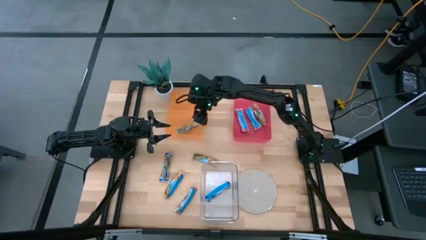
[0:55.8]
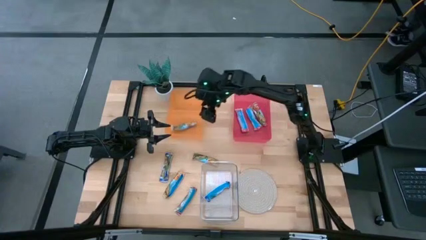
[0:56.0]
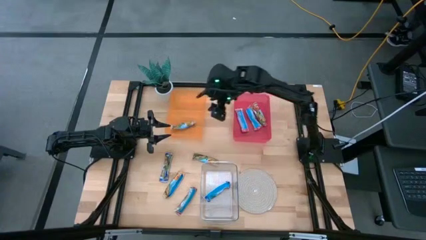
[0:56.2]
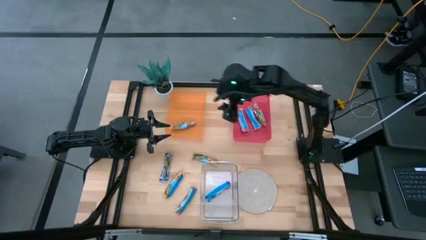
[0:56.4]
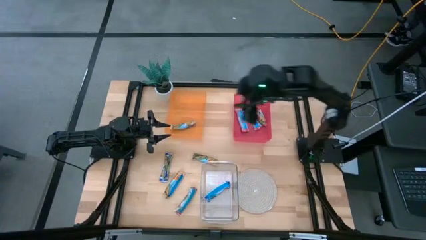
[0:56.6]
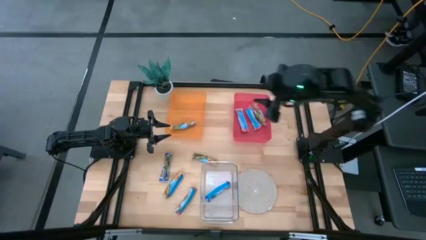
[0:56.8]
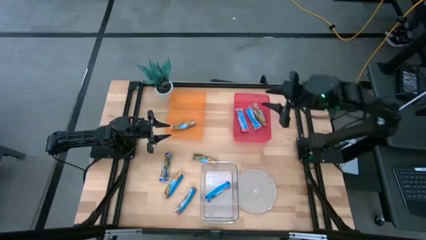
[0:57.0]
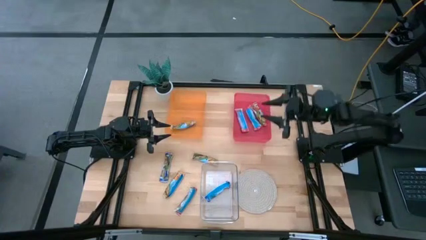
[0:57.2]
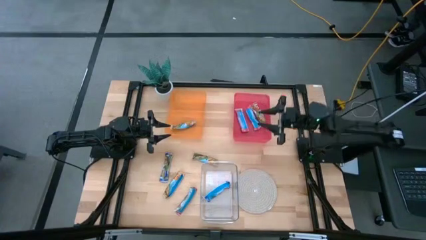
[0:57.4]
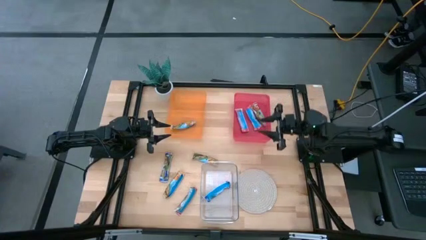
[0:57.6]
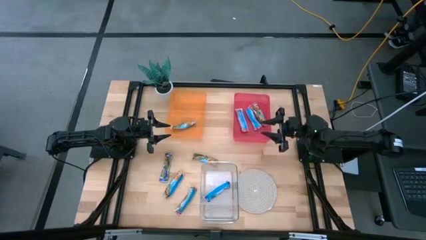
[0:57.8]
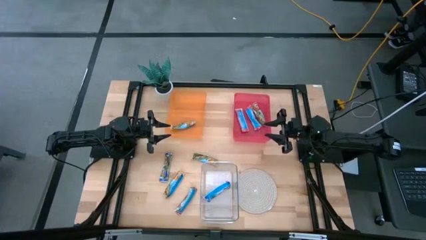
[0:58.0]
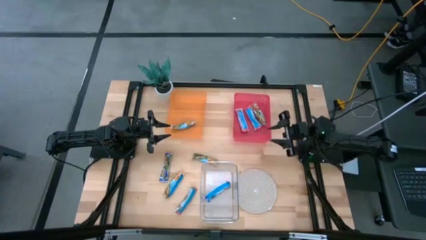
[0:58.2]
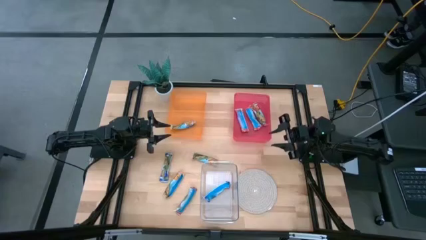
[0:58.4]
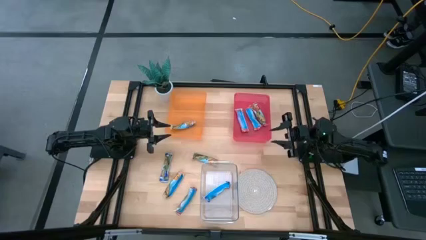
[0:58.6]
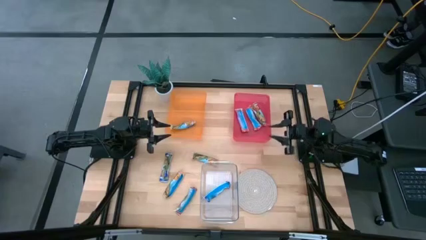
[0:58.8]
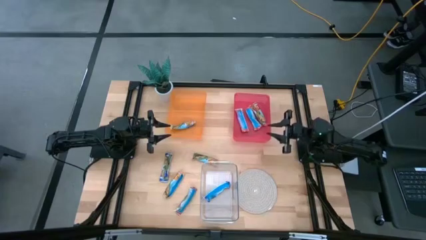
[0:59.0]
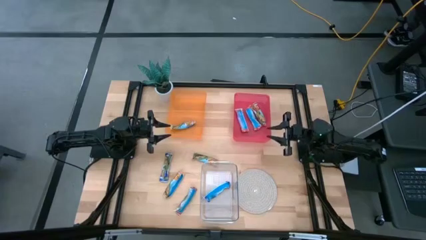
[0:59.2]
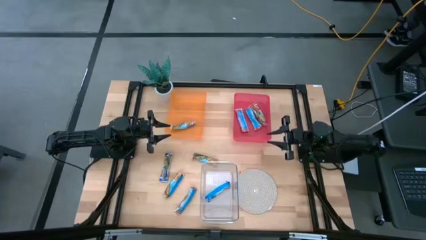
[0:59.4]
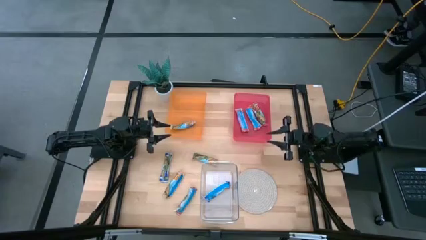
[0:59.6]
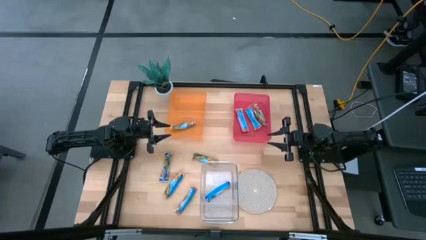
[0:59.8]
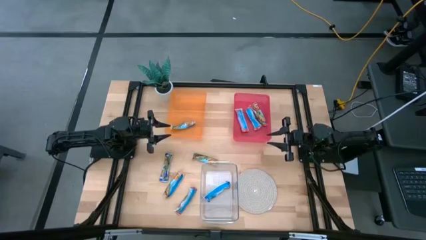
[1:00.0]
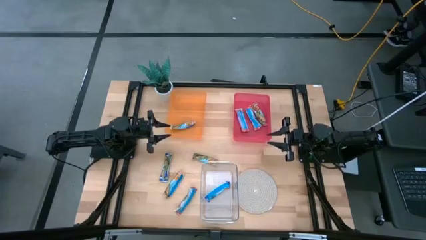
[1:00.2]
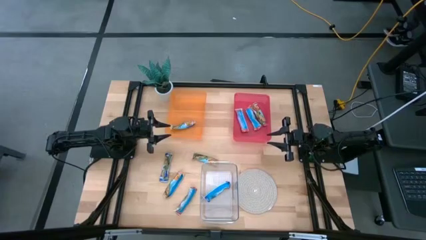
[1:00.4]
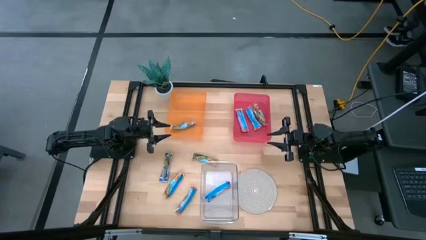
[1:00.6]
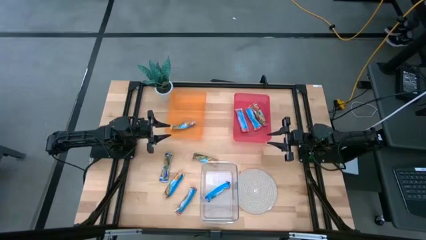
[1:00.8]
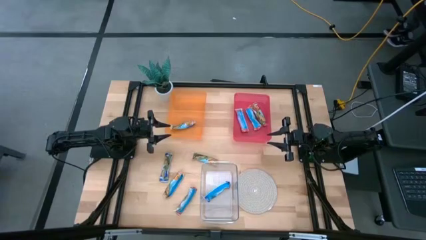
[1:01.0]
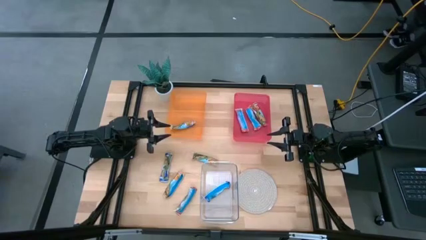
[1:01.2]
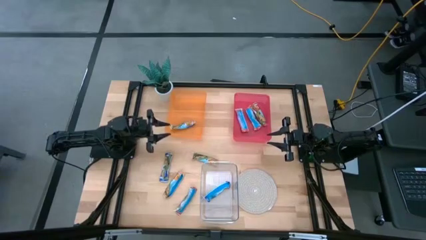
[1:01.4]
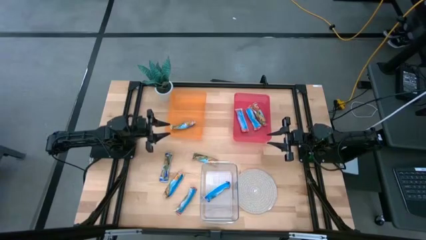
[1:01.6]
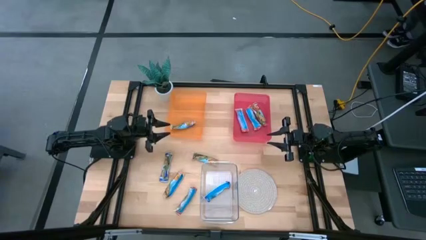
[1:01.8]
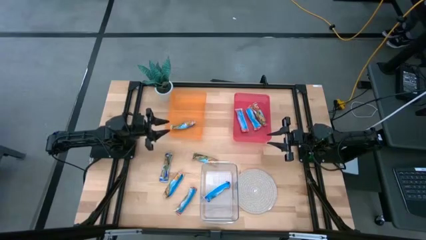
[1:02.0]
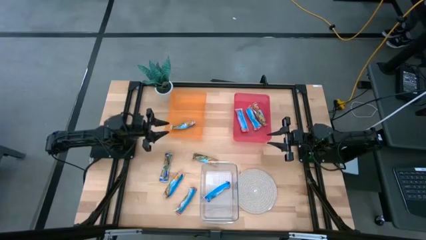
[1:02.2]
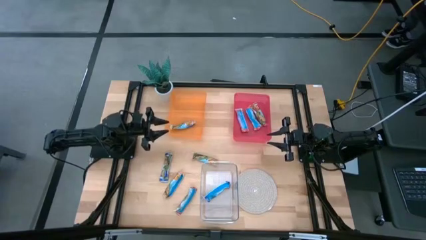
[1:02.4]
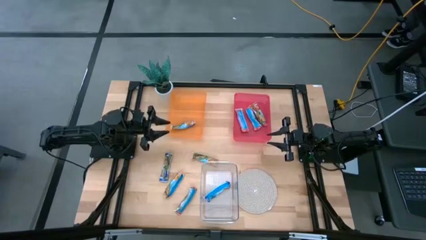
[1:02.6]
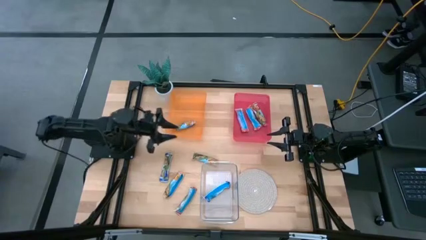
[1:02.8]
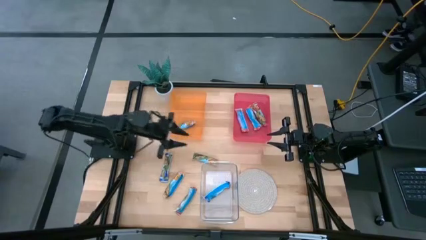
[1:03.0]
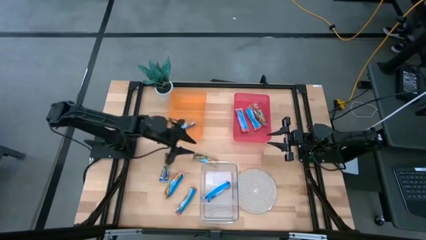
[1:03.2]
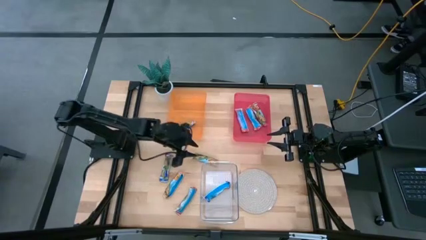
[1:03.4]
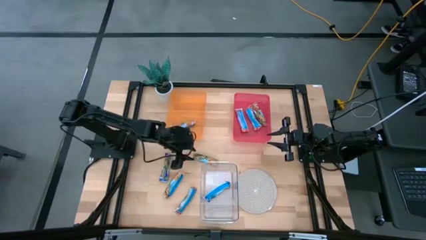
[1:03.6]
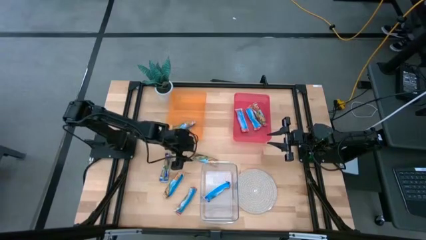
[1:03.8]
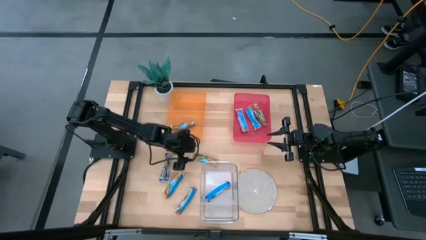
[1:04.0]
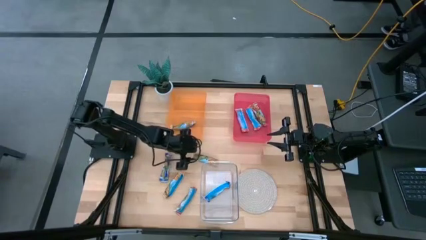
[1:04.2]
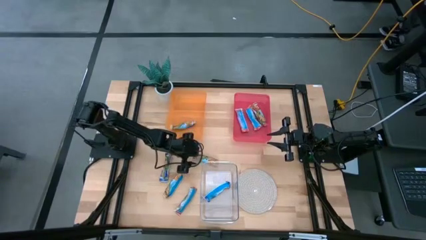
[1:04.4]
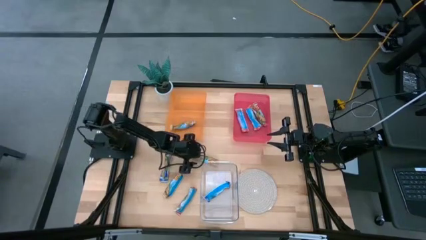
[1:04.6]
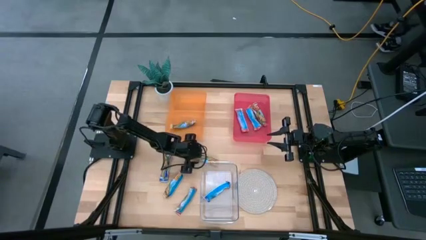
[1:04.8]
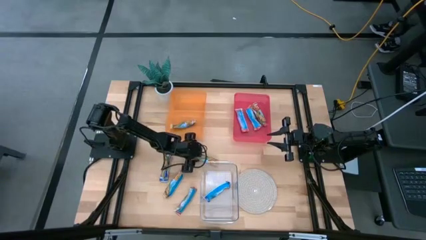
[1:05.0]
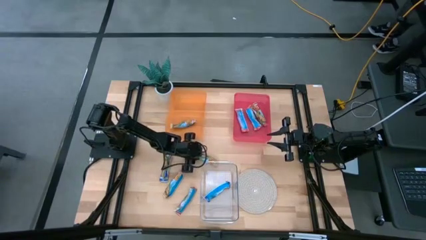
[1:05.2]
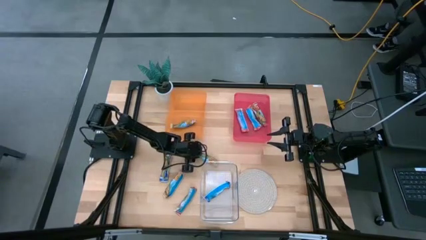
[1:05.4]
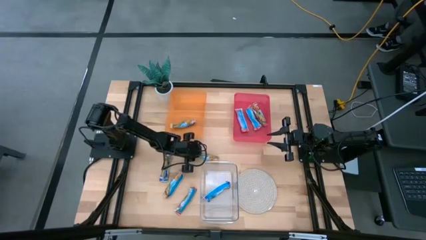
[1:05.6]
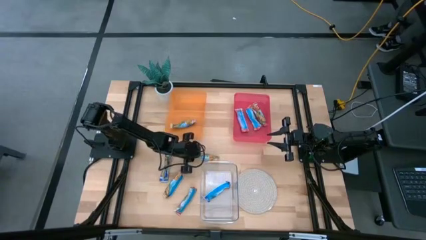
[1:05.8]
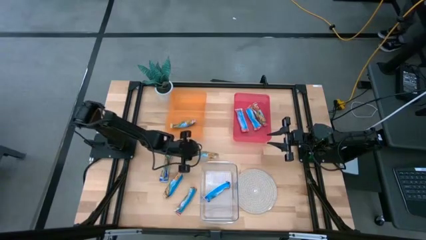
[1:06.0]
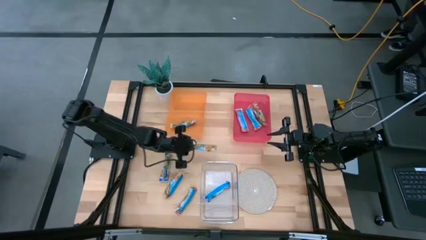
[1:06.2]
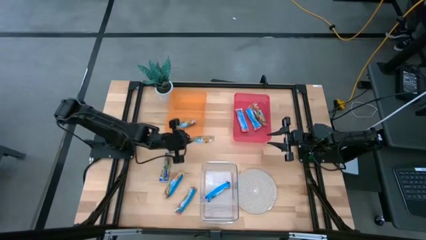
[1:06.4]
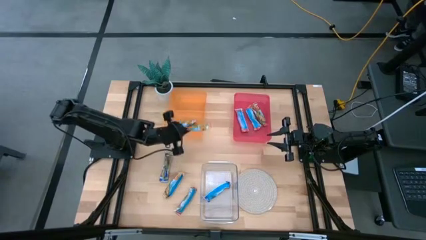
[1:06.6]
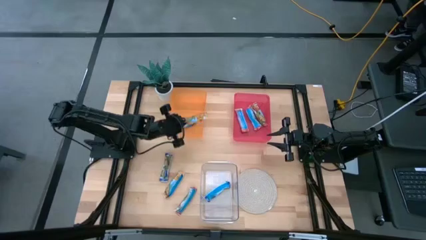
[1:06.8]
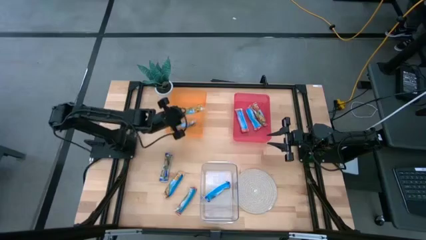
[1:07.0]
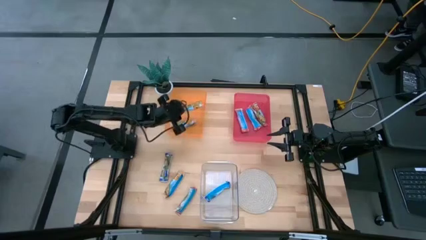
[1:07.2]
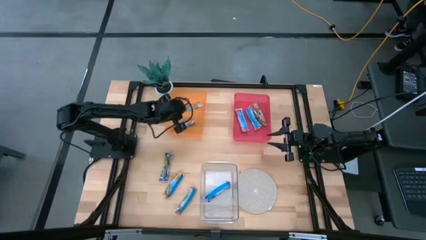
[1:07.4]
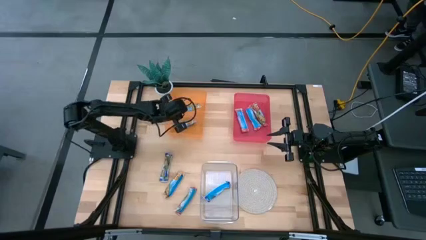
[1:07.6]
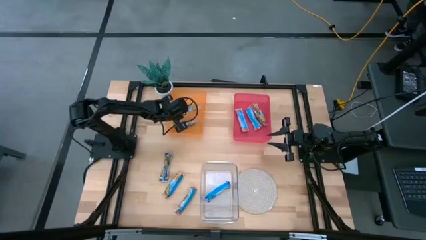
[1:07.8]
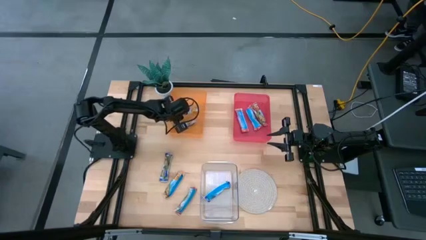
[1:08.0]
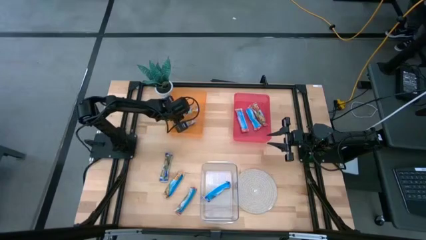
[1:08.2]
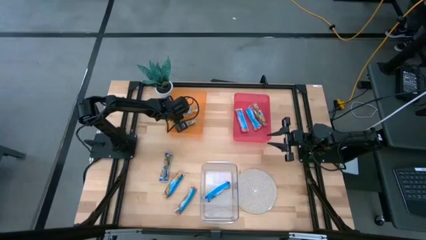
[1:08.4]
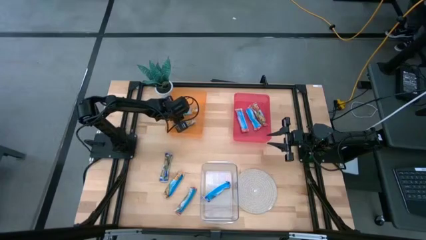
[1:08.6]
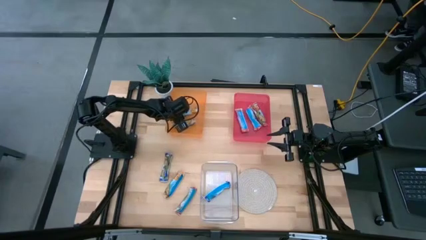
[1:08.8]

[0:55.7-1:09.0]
Task: Pick and place Granola Bars by type
Put the yellow granola bar into the orange bin
